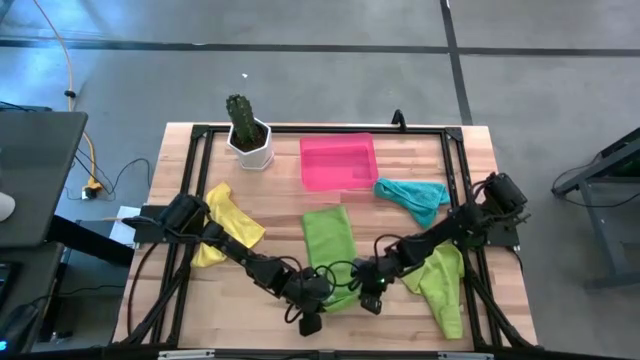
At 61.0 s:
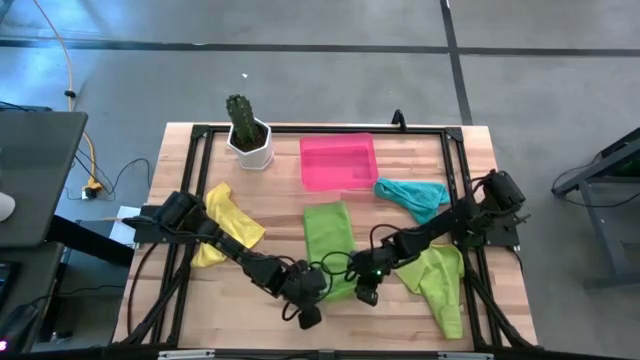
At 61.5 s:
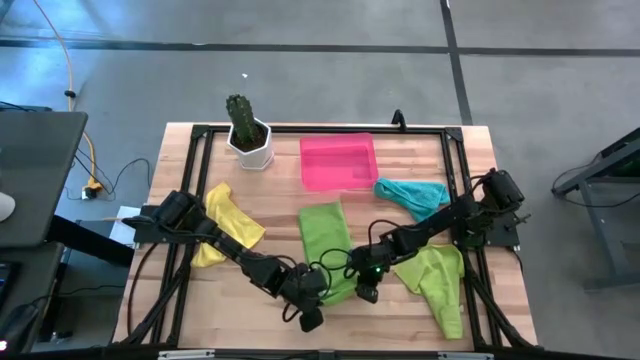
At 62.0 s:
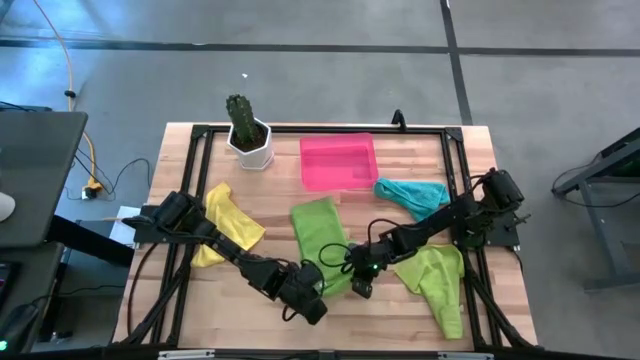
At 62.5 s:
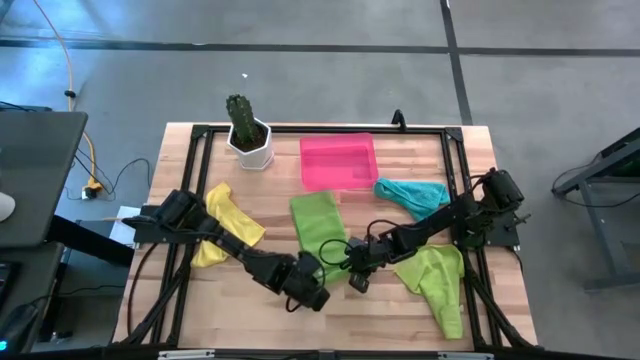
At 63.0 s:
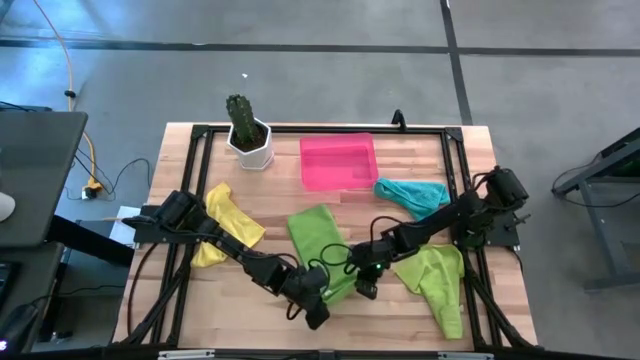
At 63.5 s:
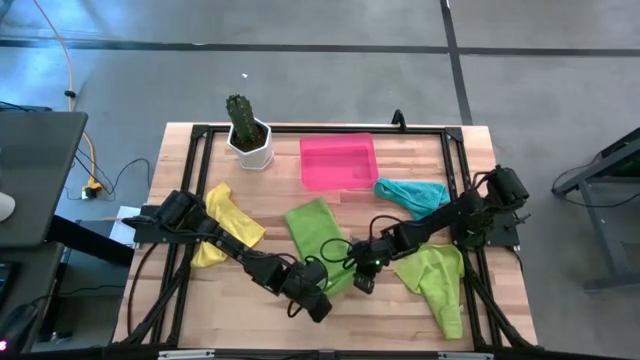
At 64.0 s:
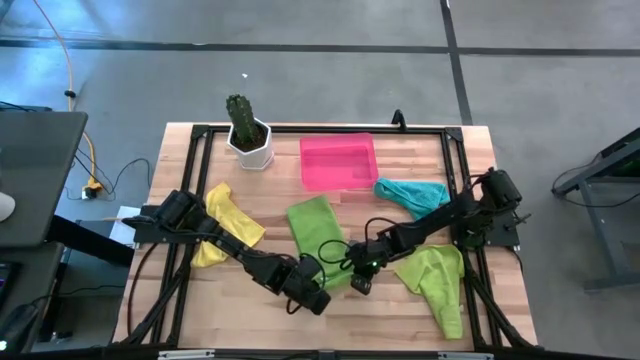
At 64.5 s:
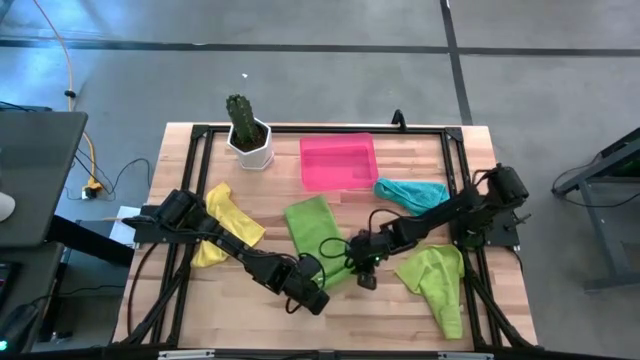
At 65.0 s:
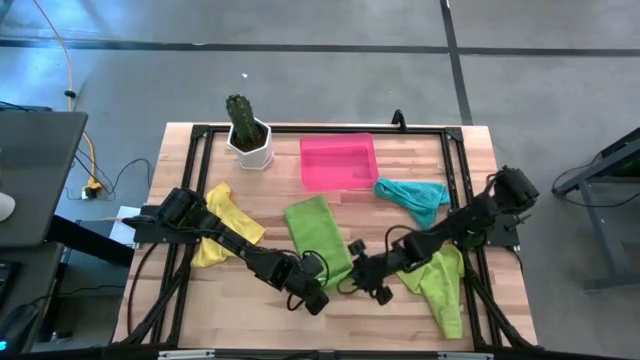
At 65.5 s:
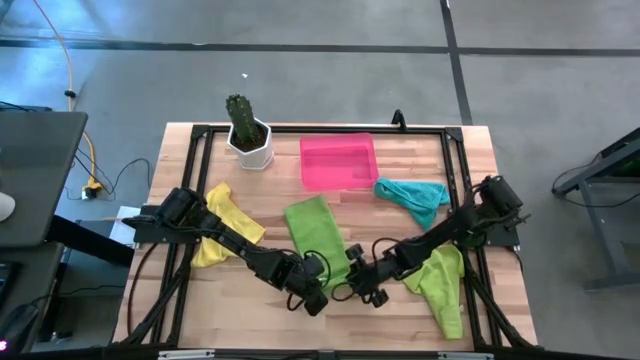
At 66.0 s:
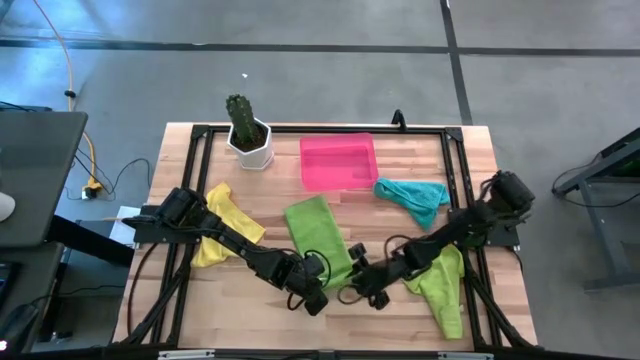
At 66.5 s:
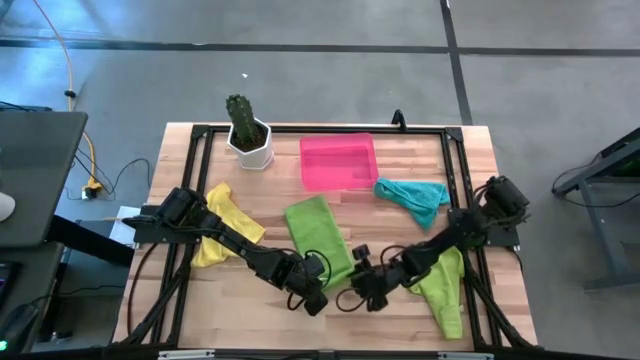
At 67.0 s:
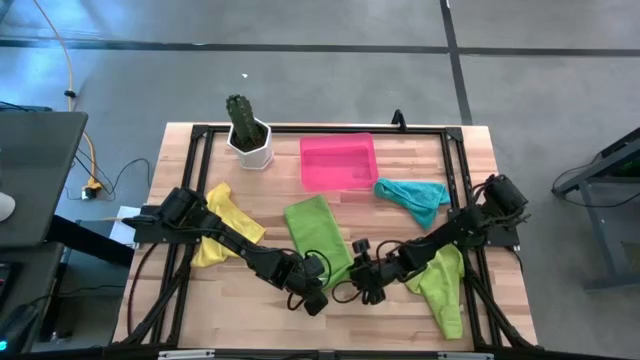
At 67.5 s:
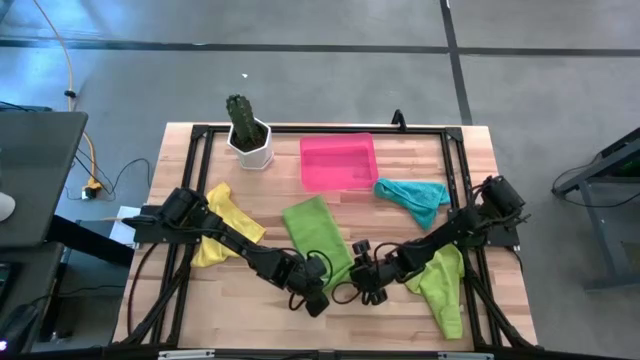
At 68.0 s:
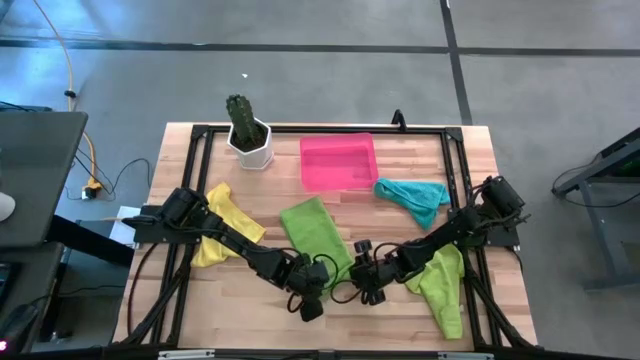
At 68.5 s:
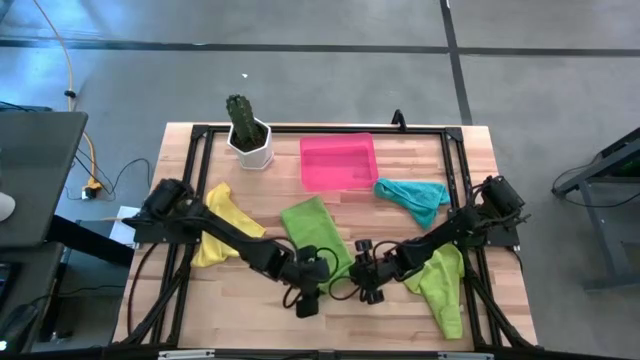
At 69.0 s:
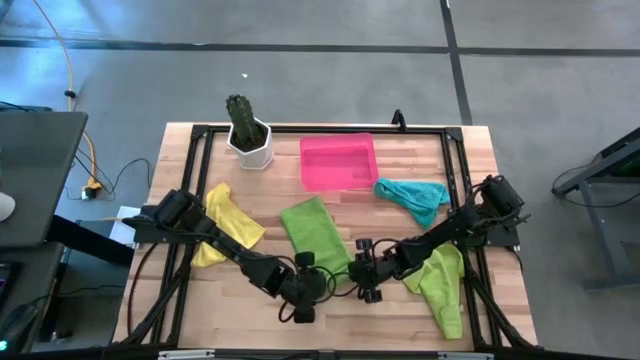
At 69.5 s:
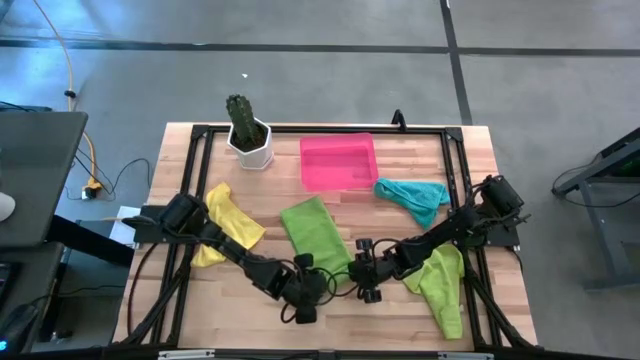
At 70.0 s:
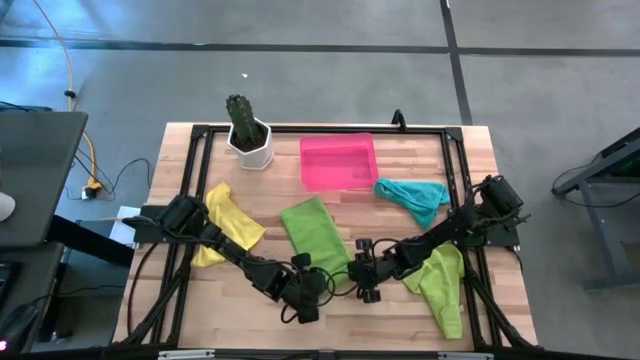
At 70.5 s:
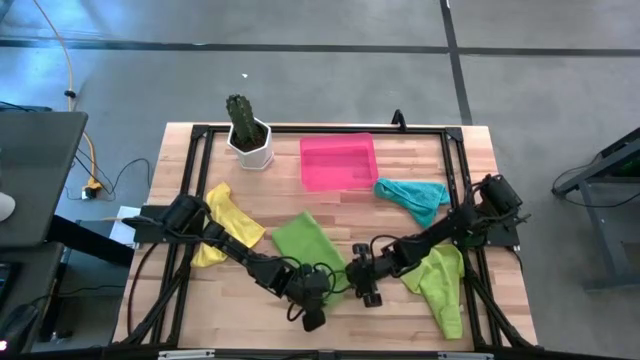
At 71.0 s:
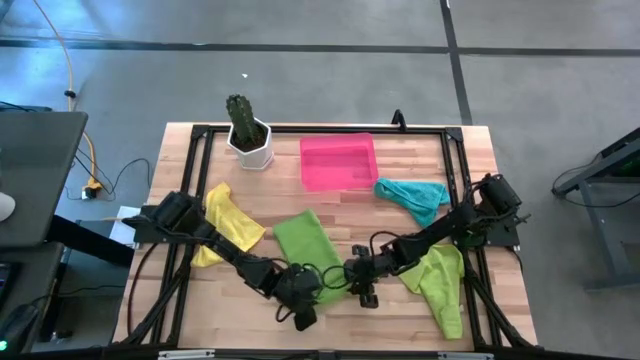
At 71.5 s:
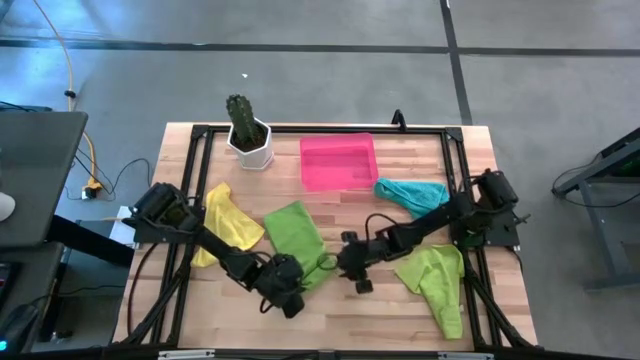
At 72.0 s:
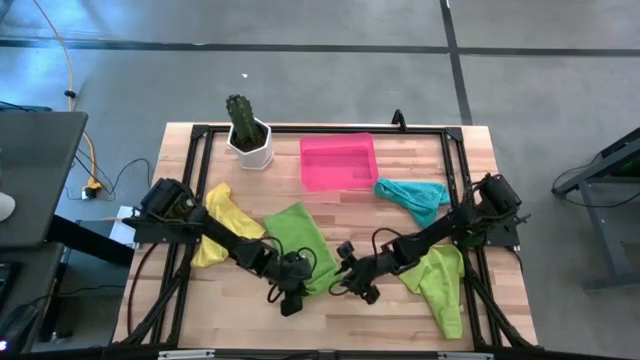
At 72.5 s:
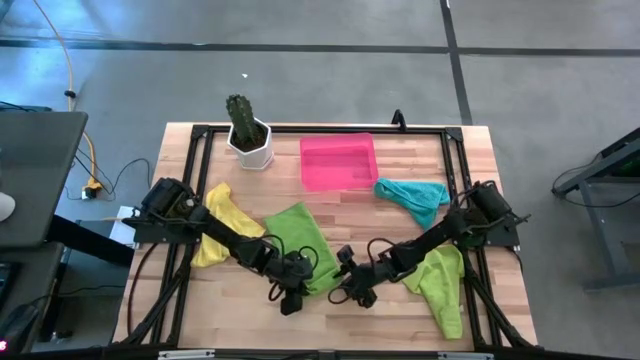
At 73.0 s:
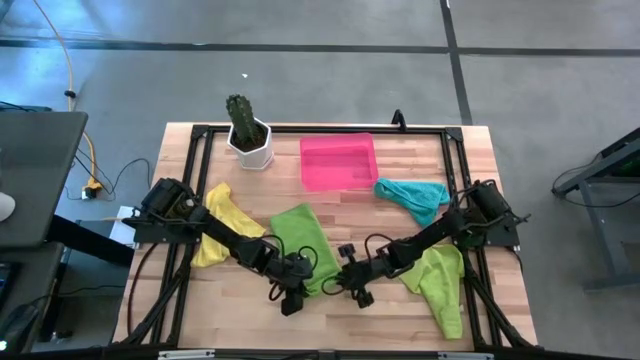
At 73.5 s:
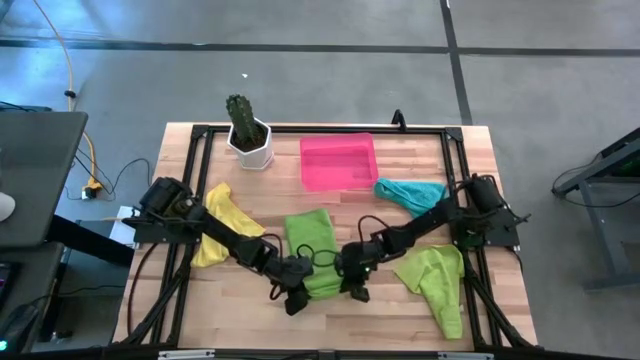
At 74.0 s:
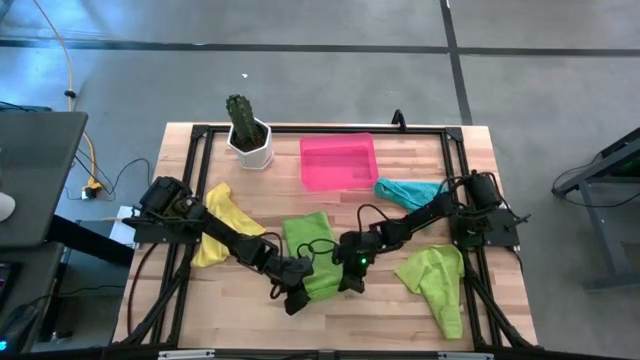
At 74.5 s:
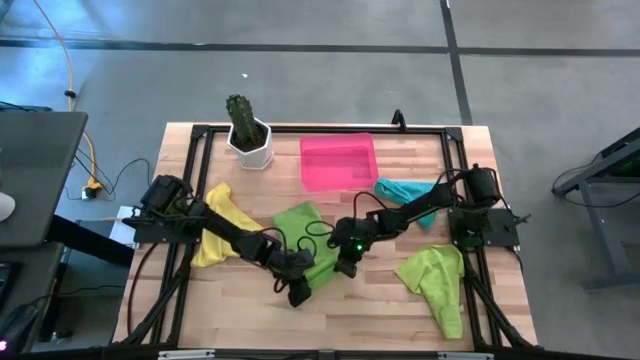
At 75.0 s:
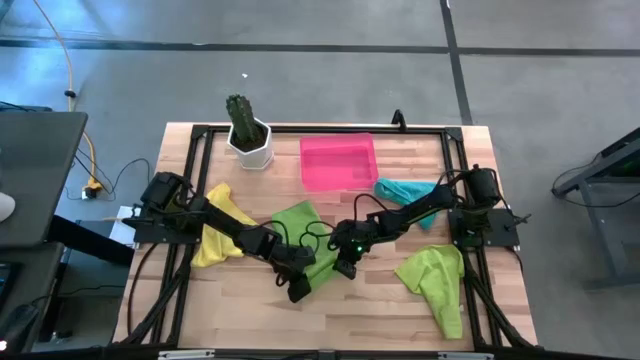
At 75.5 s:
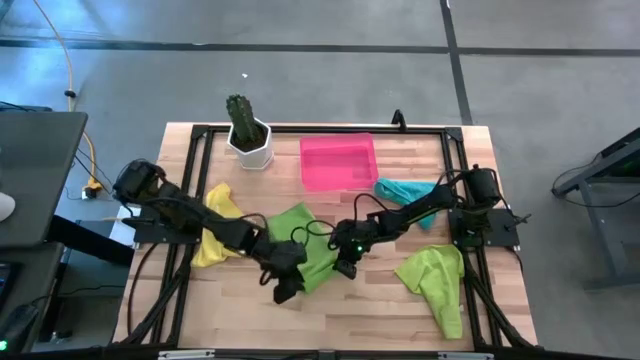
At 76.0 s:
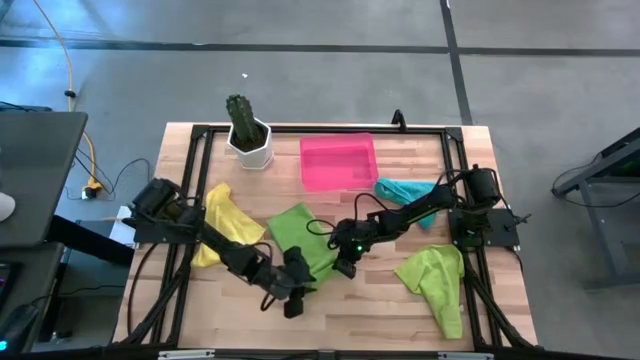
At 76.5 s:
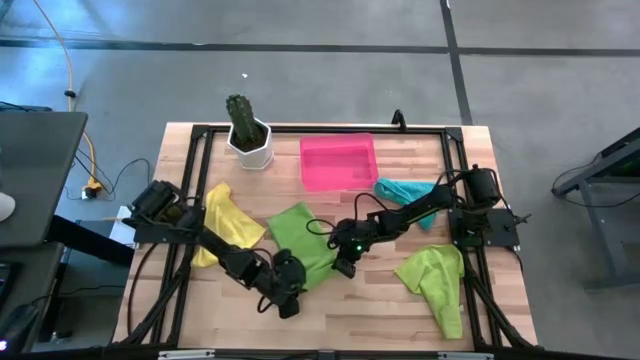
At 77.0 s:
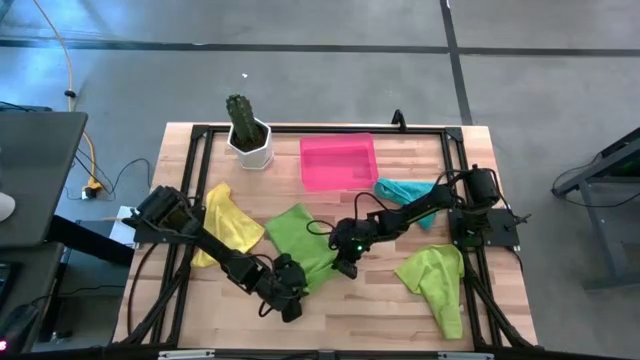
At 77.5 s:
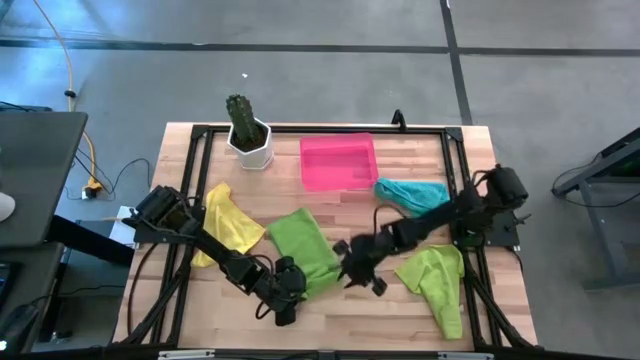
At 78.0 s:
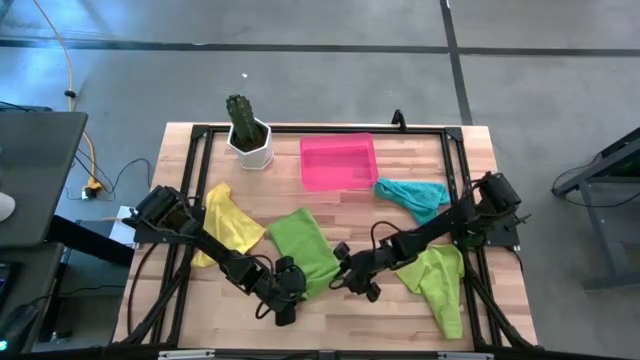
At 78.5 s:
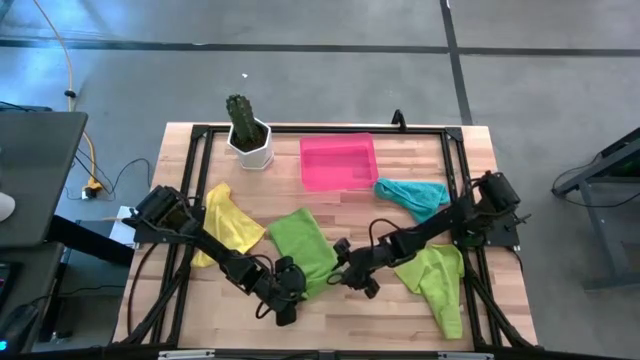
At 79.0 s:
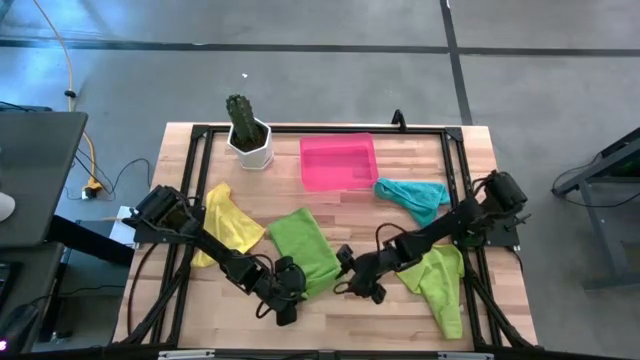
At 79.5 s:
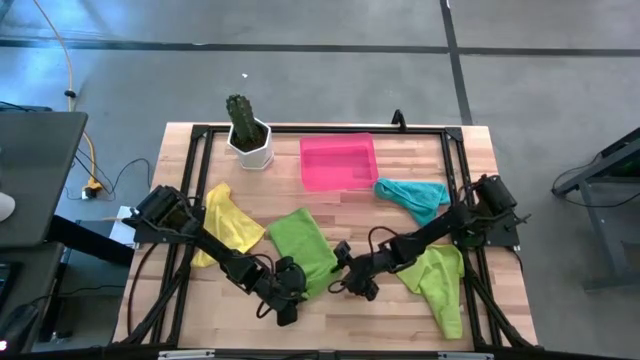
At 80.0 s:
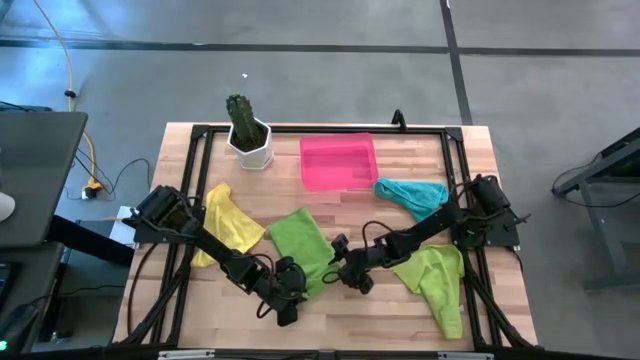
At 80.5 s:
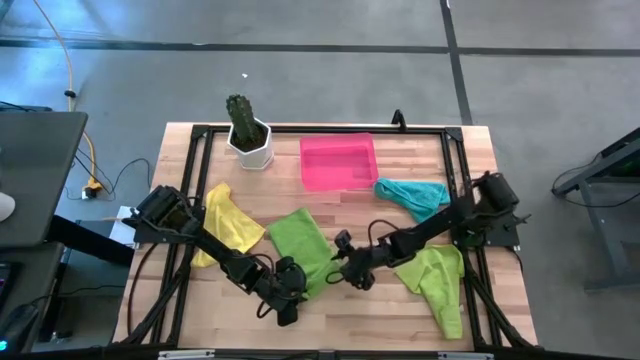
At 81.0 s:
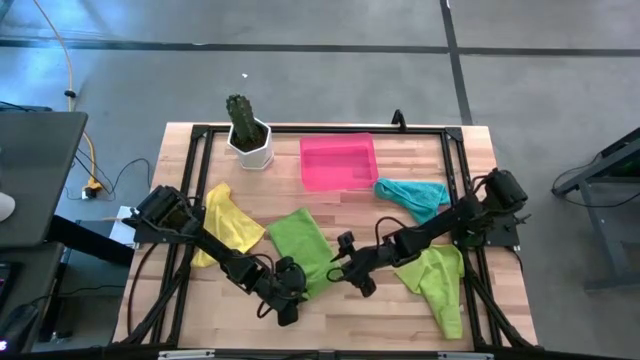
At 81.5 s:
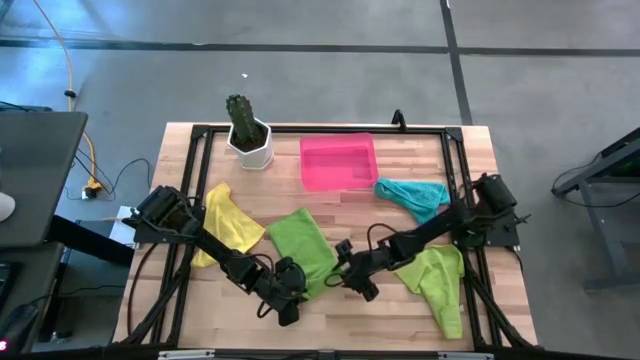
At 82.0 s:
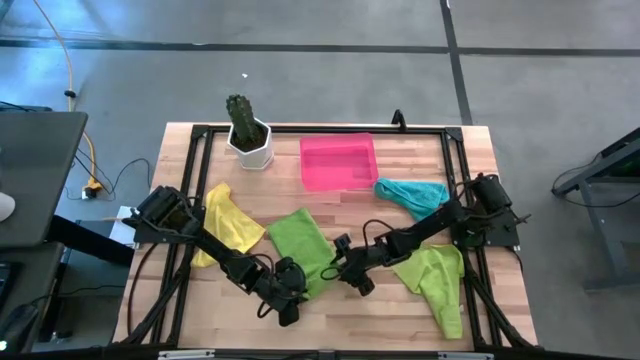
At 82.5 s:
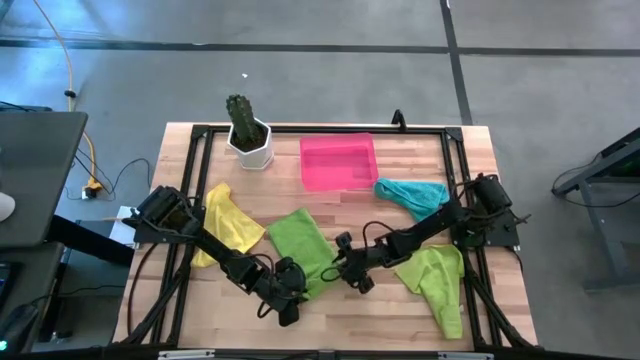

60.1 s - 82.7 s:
Task: Roll microfiber towels into tight, uniform cylinder then place into a basket
Roll the green microfiber cloth
